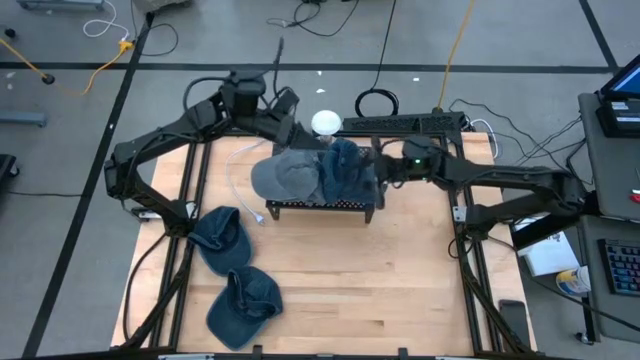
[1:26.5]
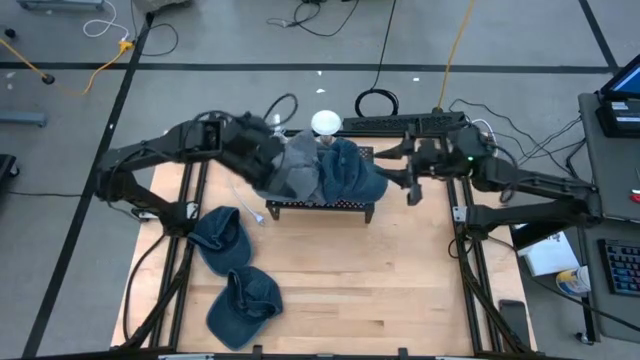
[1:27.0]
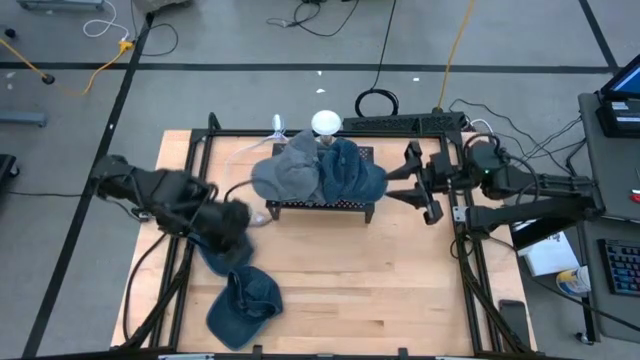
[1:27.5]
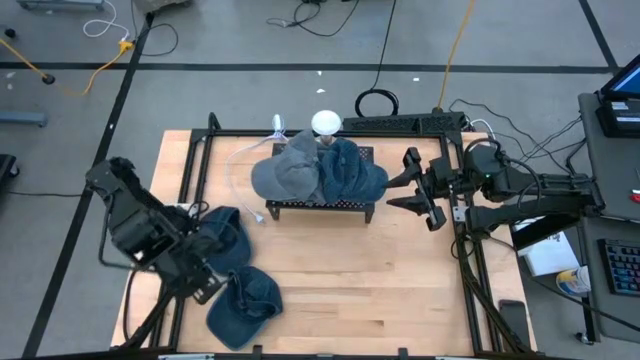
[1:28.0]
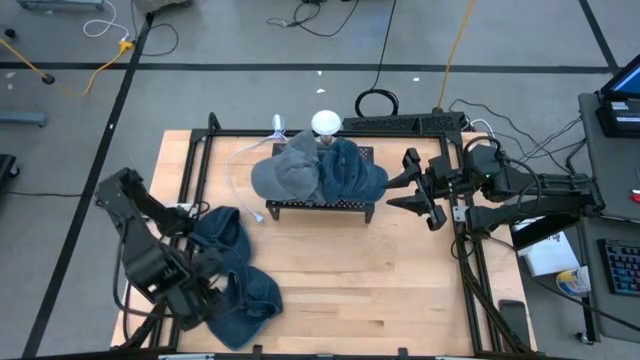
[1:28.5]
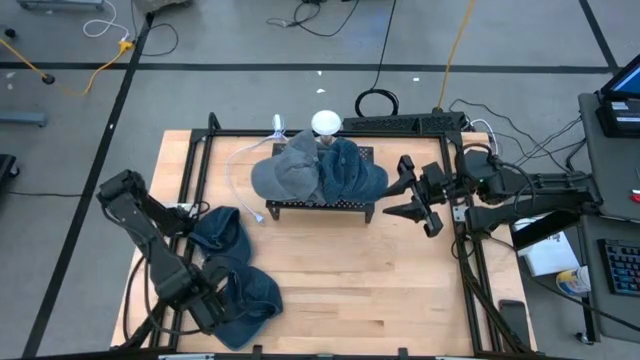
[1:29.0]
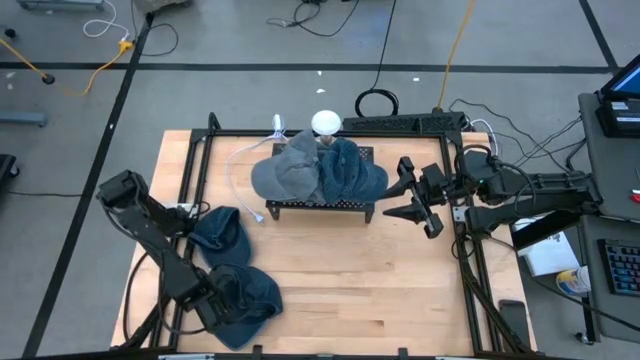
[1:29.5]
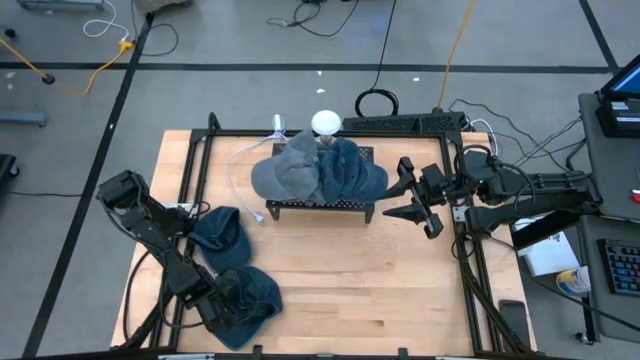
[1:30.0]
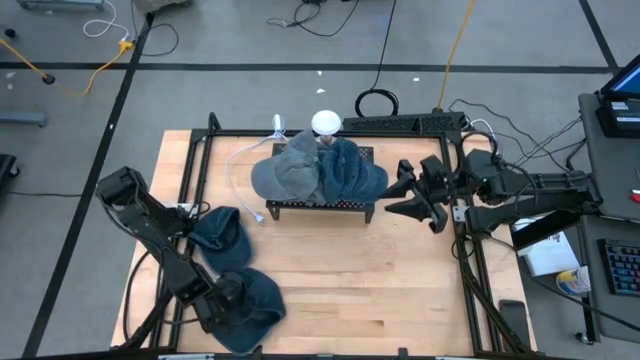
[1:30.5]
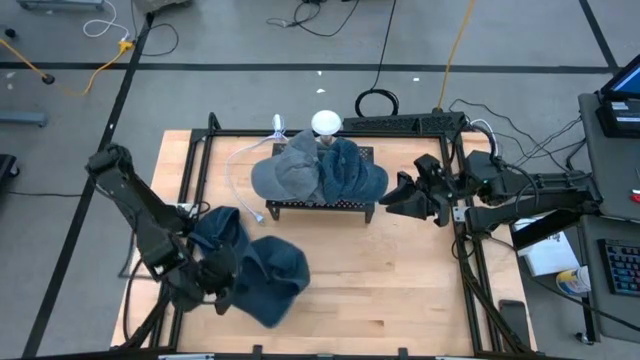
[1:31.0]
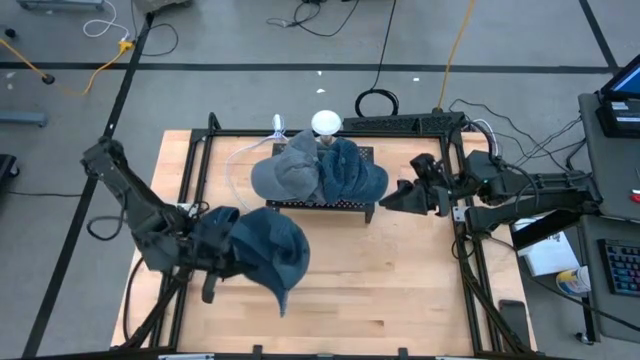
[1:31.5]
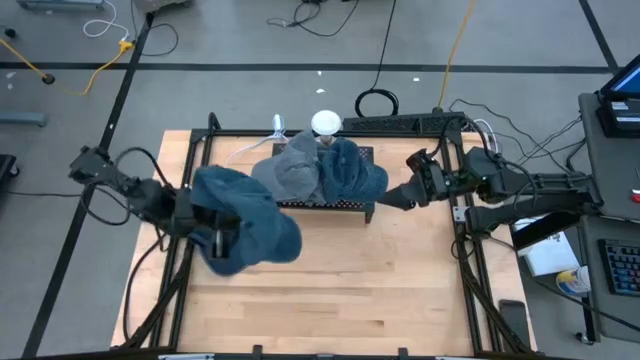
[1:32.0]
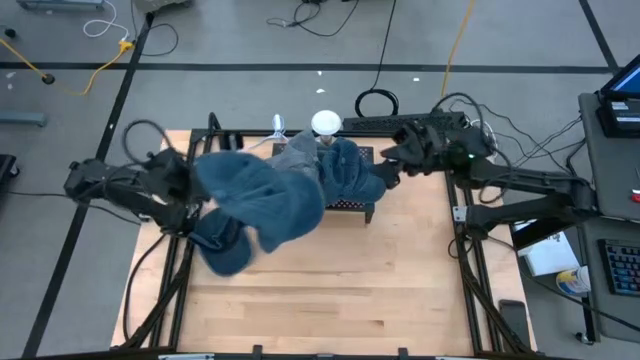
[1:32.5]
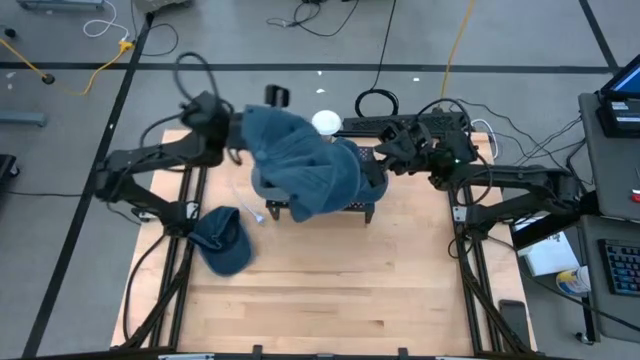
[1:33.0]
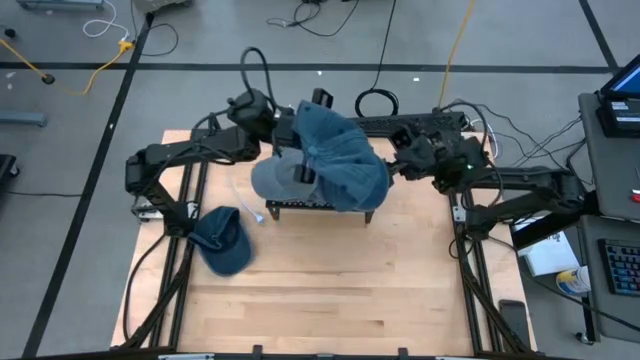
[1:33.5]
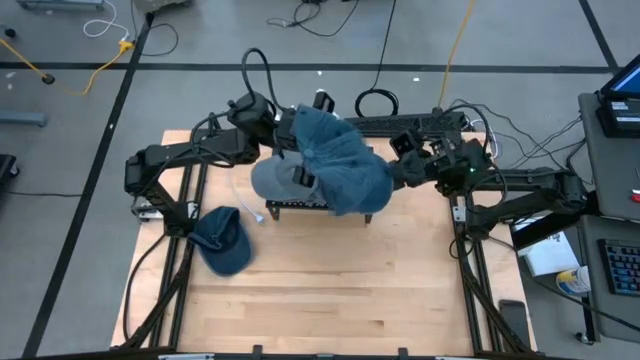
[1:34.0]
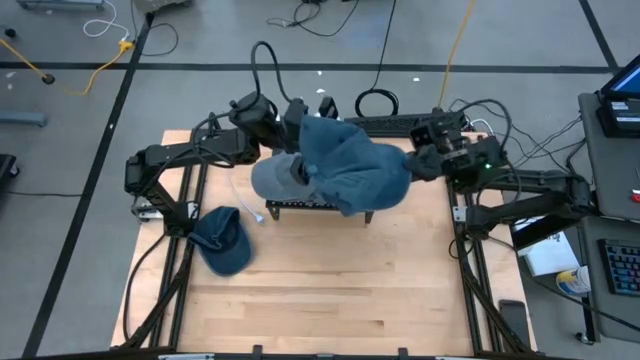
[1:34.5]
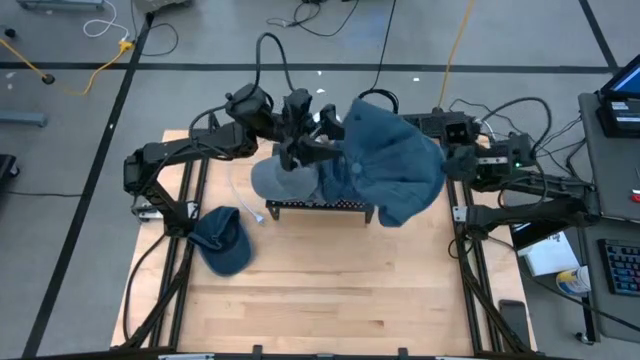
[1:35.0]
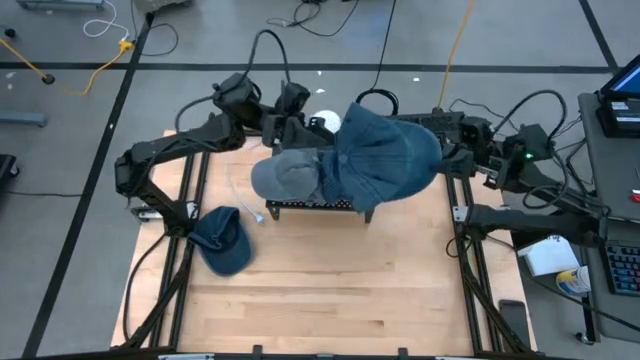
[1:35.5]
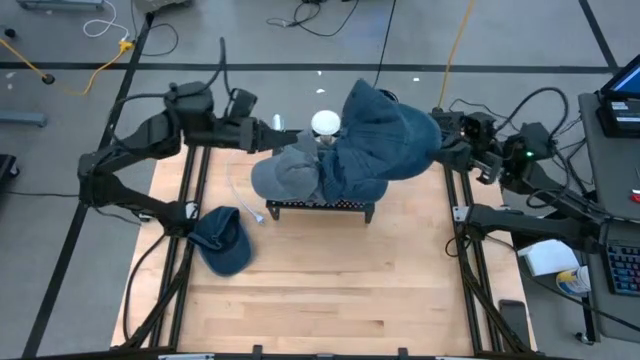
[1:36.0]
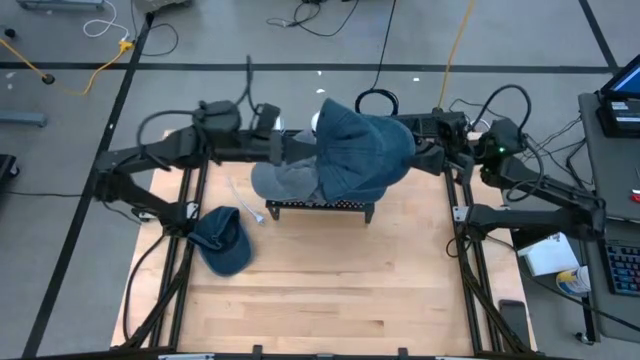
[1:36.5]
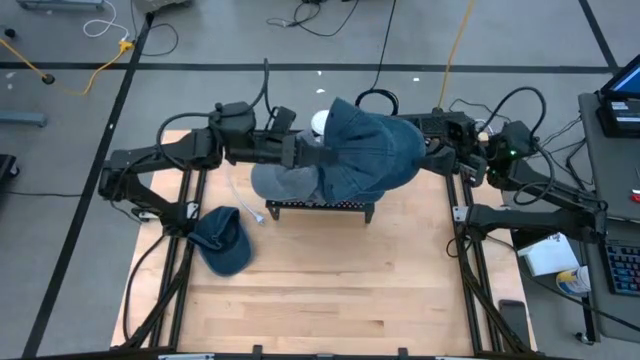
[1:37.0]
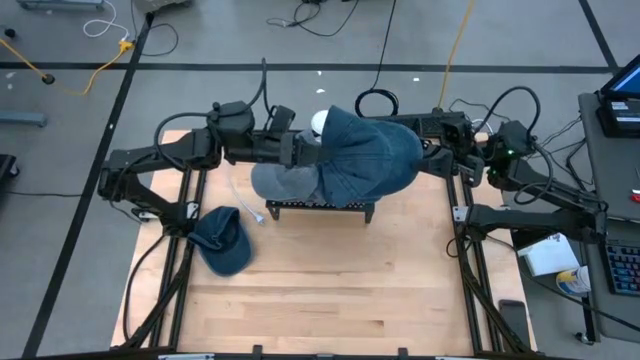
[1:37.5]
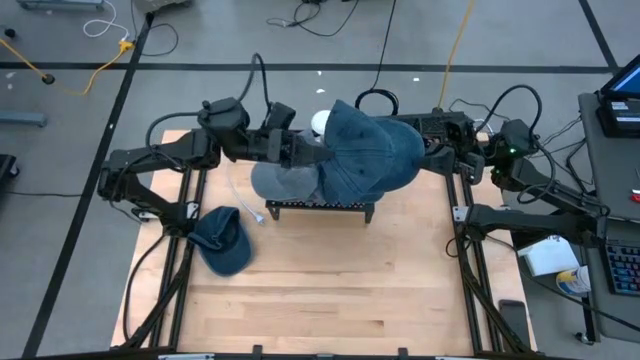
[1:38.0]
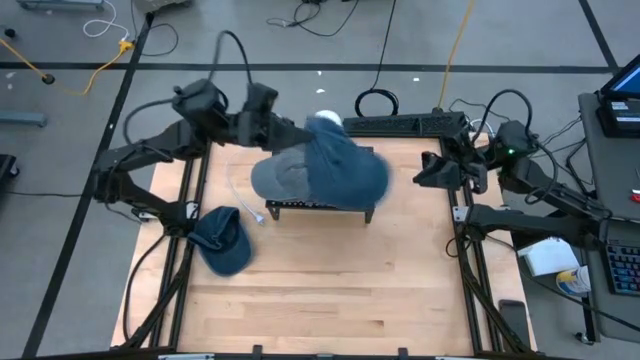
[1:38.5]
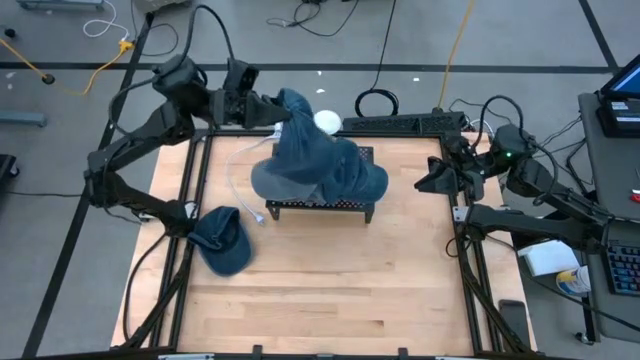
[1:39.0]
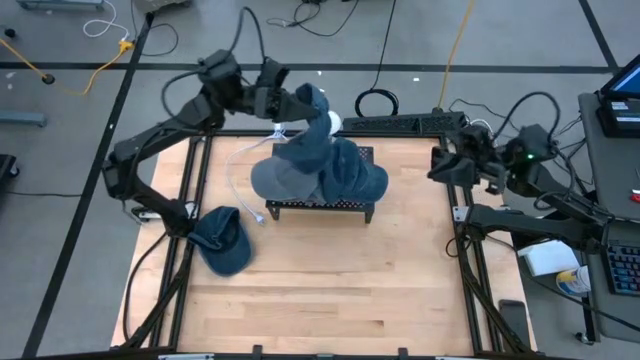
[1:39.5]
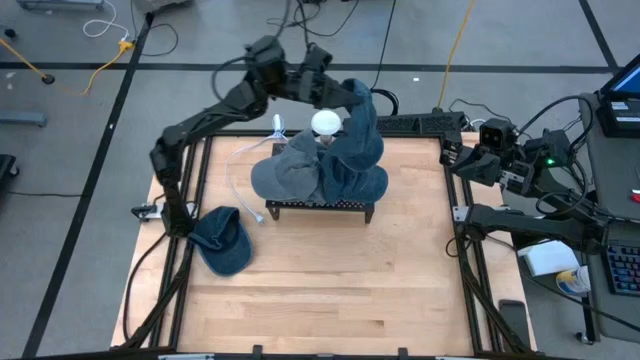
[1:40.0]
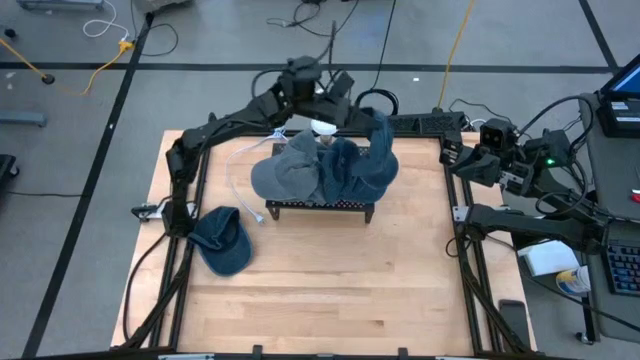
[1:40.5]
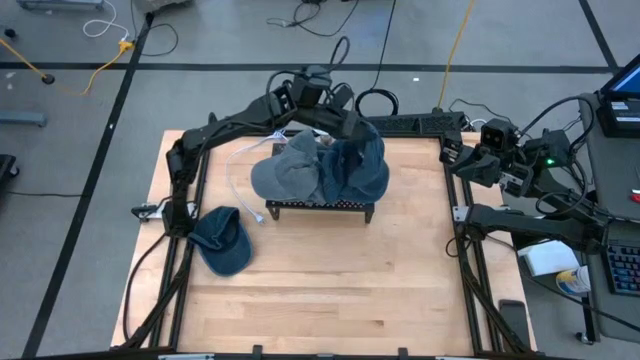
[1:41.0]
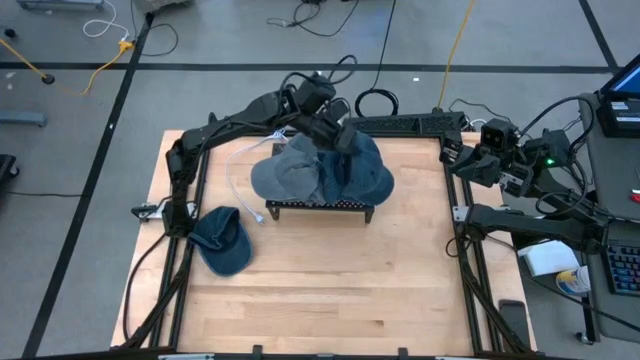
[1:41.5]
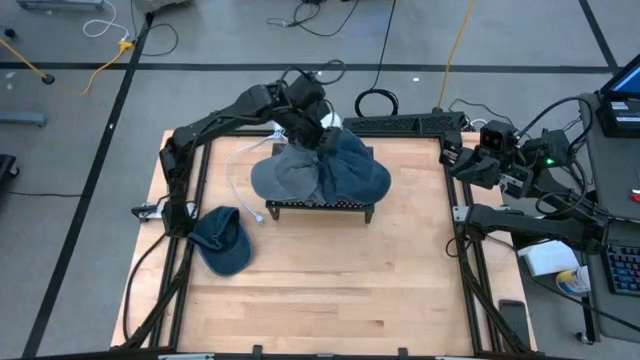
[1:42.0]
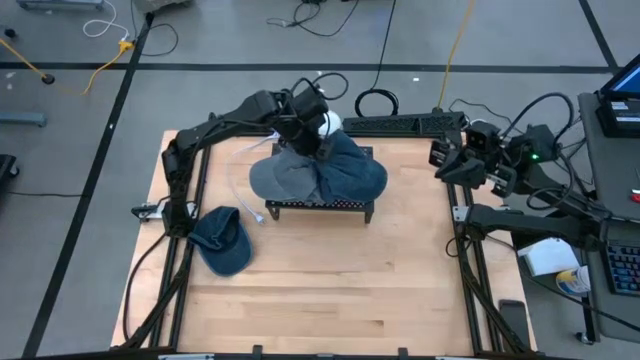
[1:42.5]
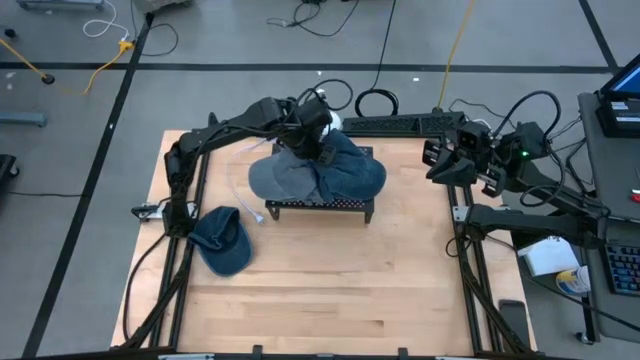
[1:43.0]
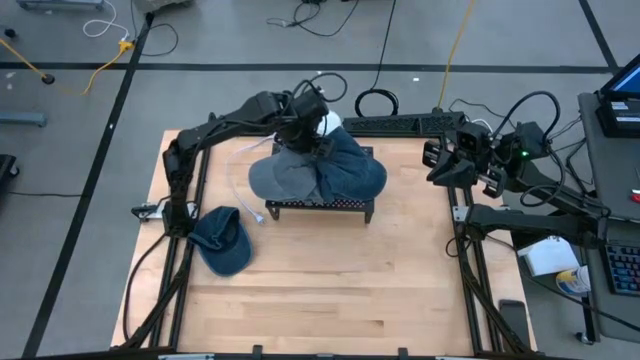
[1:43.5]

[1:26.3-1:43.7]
Task: Pick & Place hat
Stack the bottom blue cap on the blue cap on the shelf
